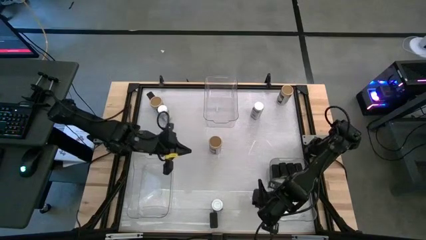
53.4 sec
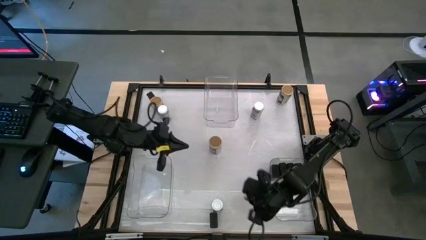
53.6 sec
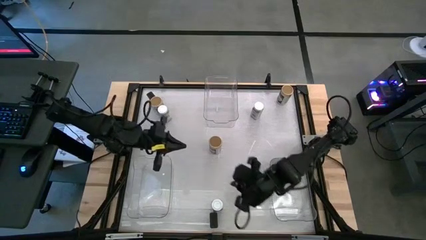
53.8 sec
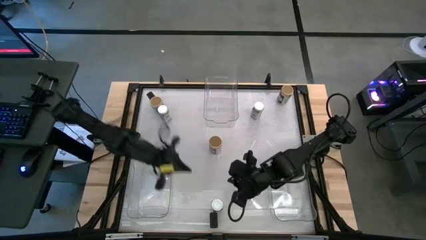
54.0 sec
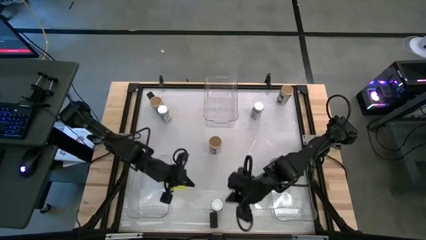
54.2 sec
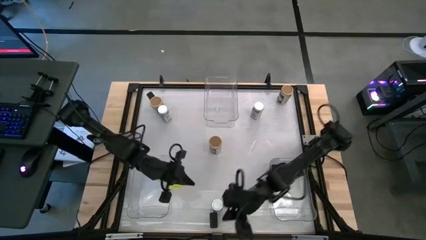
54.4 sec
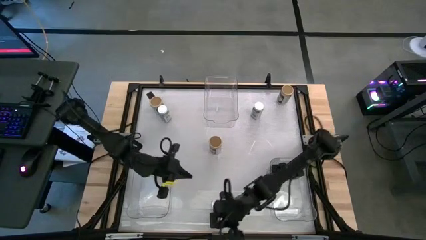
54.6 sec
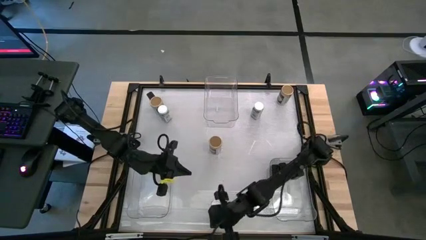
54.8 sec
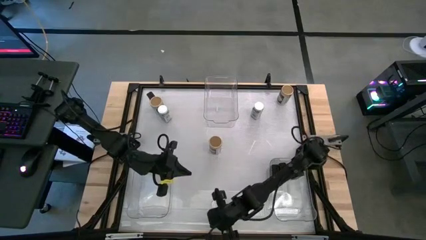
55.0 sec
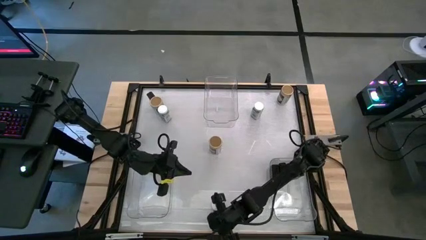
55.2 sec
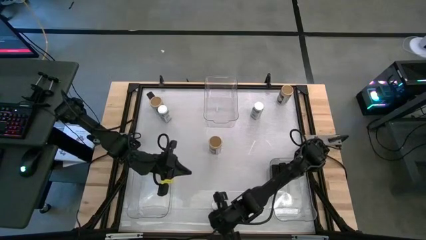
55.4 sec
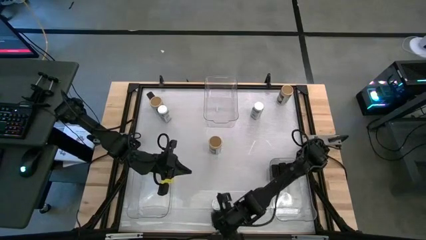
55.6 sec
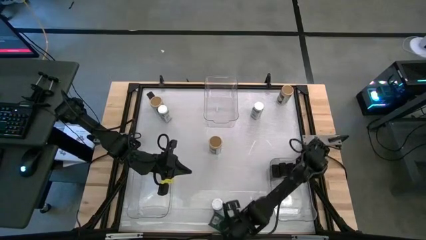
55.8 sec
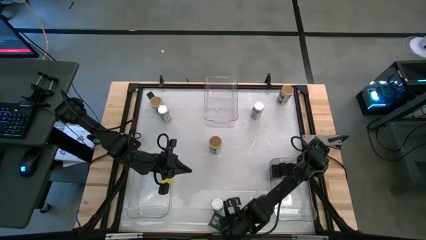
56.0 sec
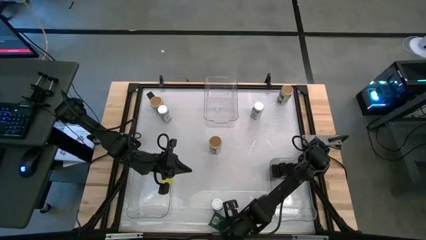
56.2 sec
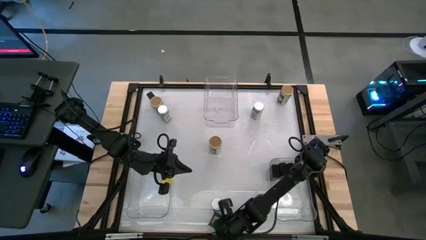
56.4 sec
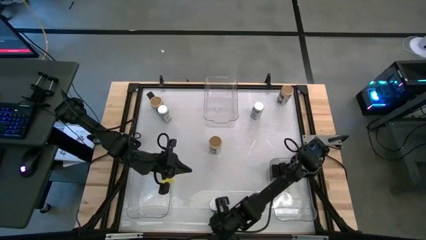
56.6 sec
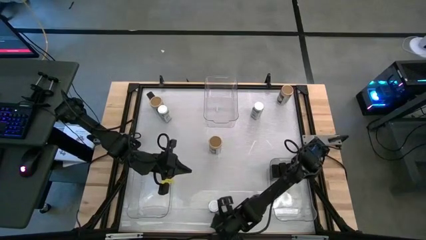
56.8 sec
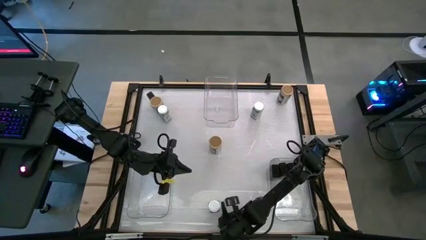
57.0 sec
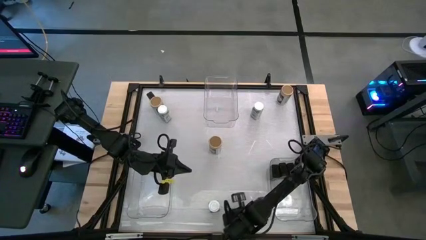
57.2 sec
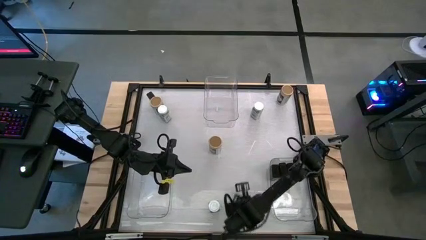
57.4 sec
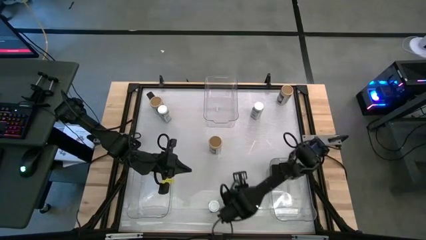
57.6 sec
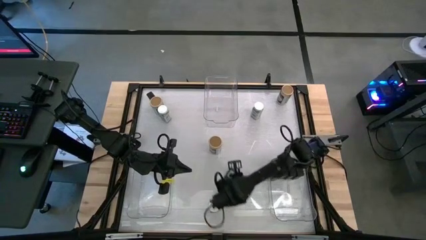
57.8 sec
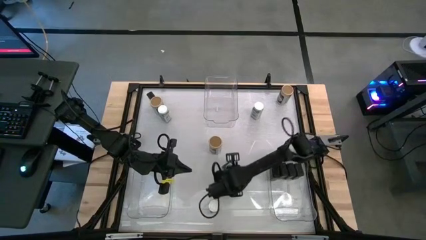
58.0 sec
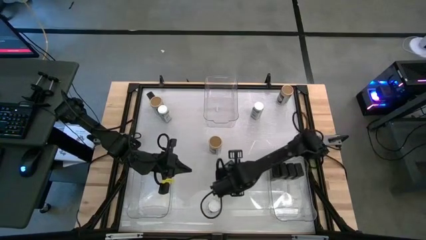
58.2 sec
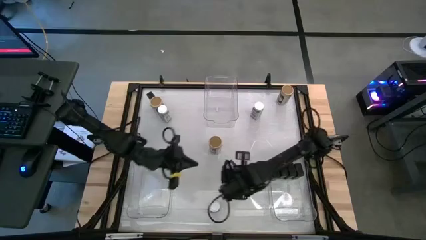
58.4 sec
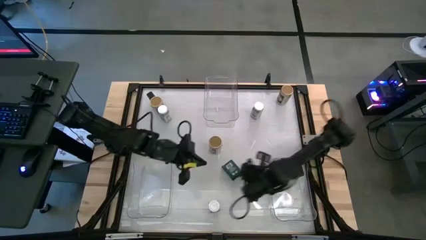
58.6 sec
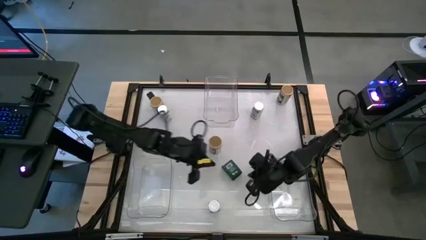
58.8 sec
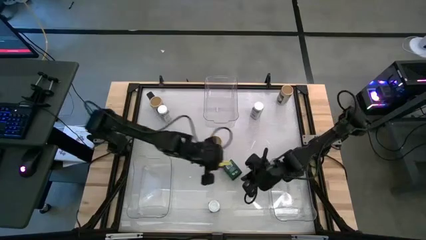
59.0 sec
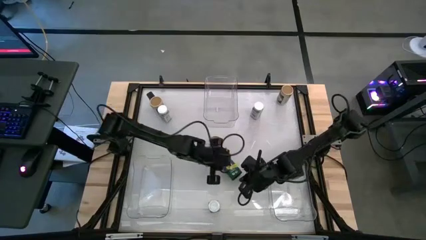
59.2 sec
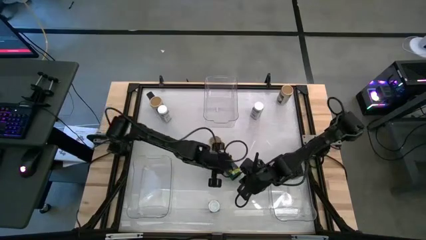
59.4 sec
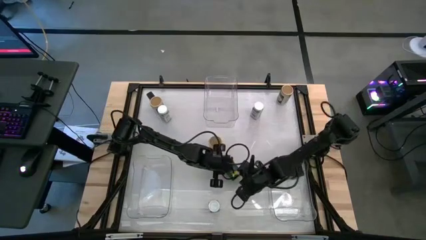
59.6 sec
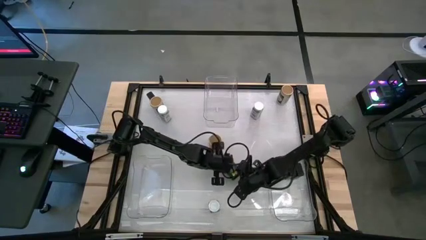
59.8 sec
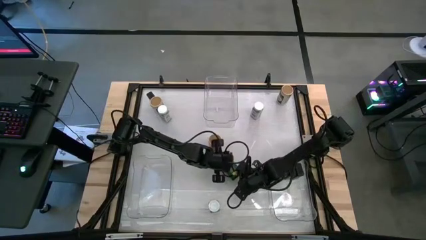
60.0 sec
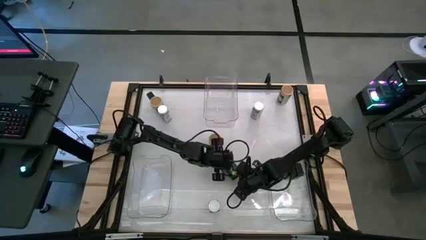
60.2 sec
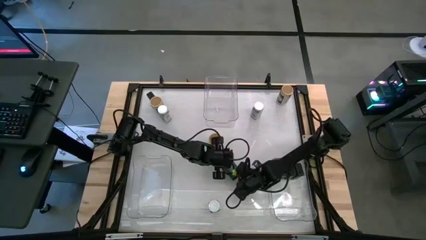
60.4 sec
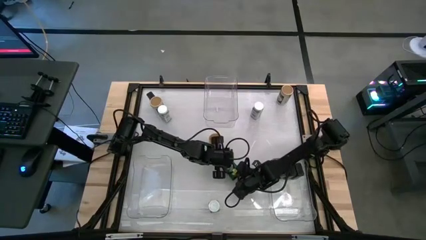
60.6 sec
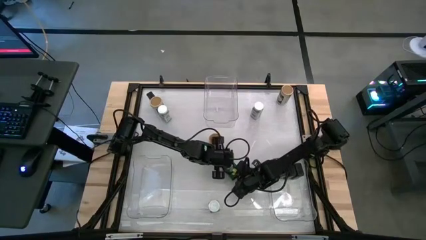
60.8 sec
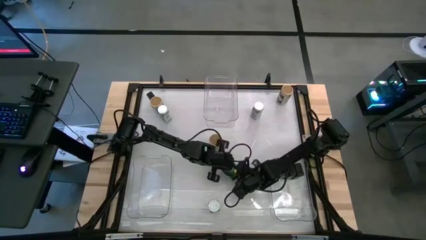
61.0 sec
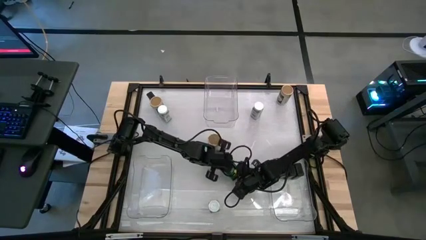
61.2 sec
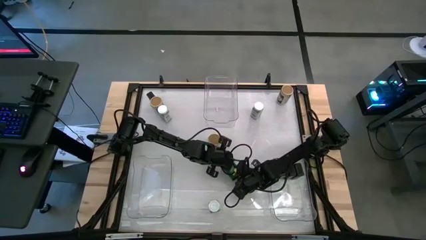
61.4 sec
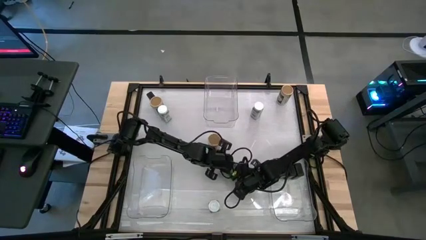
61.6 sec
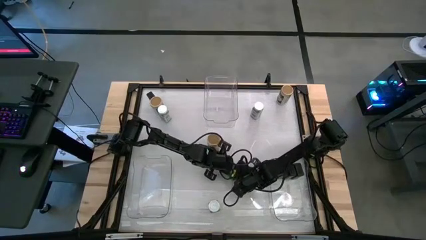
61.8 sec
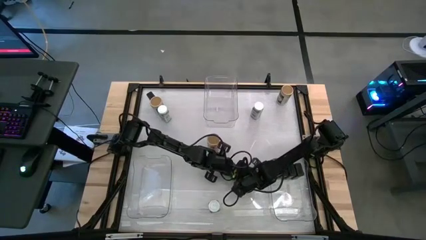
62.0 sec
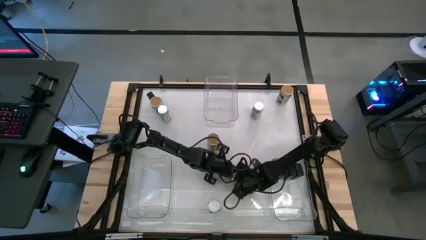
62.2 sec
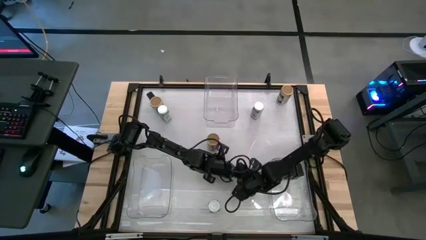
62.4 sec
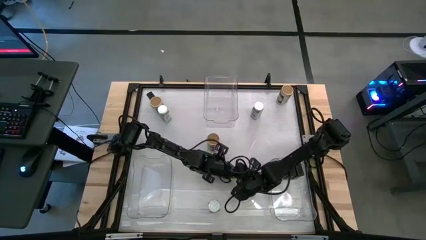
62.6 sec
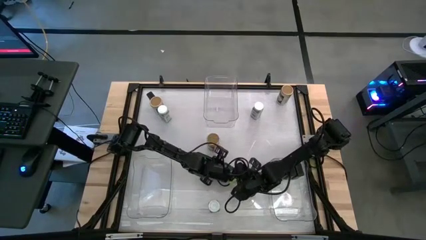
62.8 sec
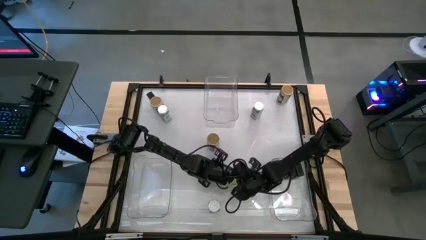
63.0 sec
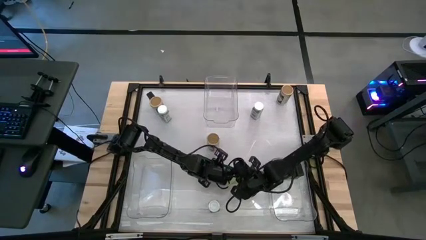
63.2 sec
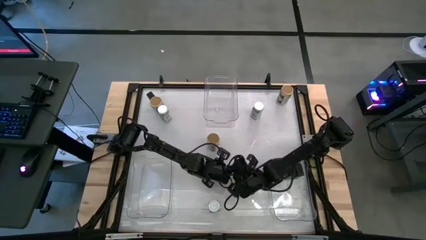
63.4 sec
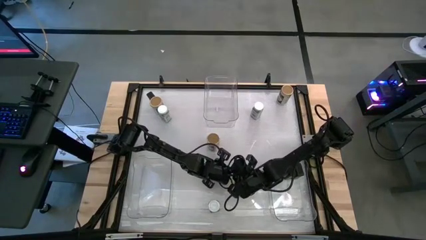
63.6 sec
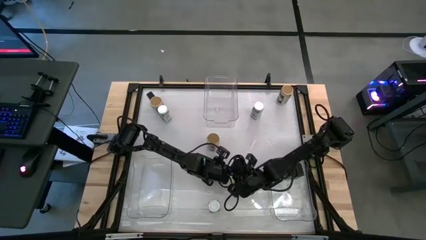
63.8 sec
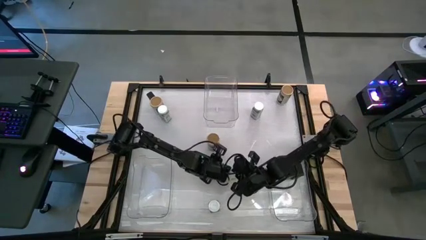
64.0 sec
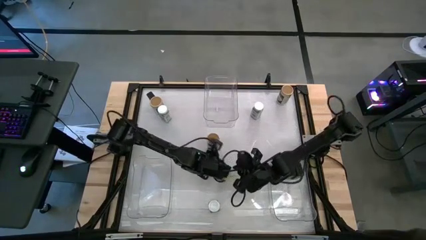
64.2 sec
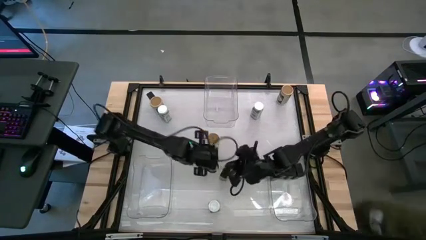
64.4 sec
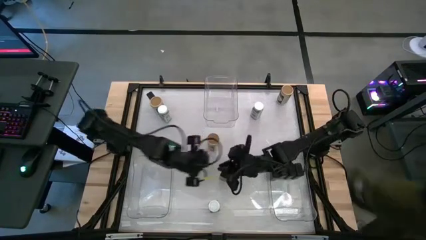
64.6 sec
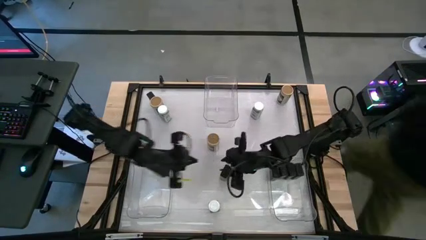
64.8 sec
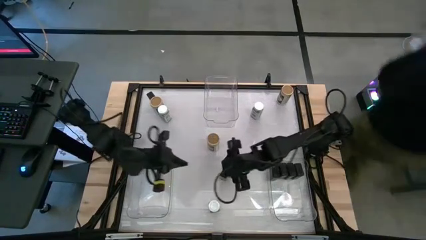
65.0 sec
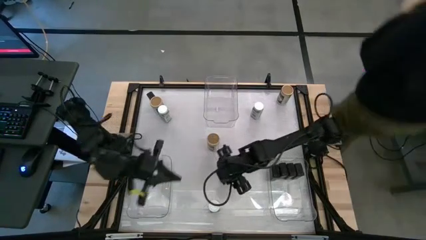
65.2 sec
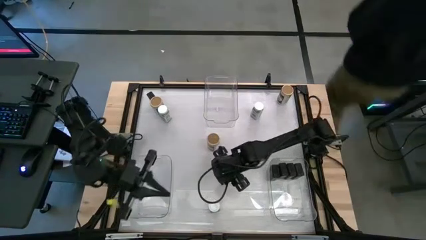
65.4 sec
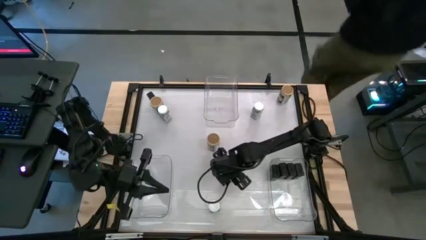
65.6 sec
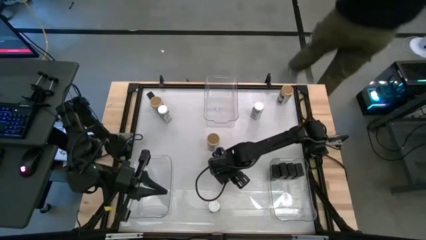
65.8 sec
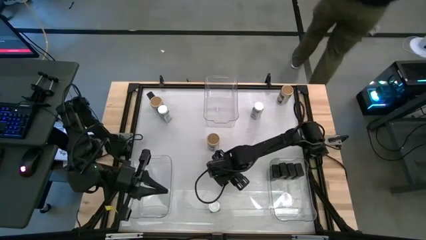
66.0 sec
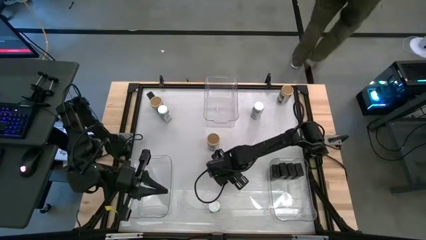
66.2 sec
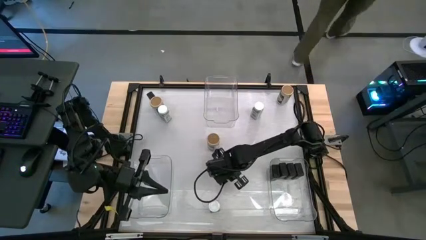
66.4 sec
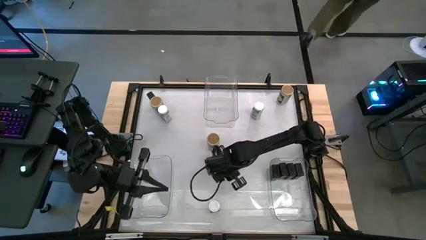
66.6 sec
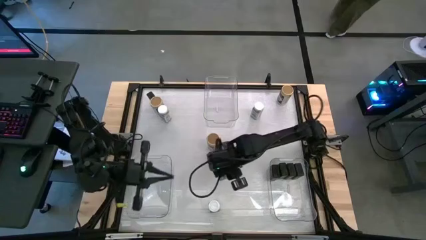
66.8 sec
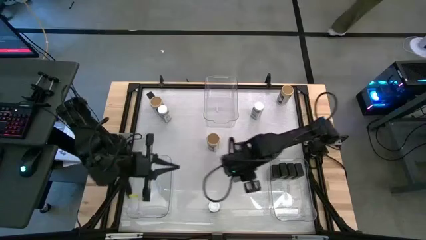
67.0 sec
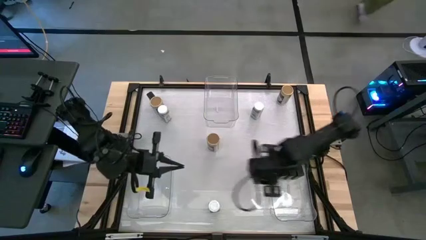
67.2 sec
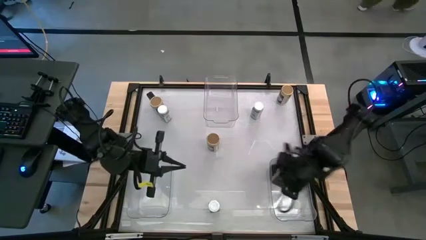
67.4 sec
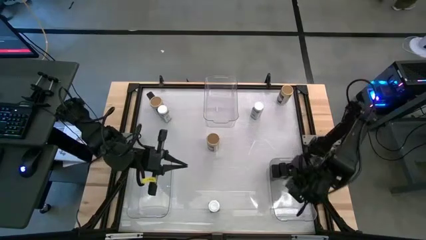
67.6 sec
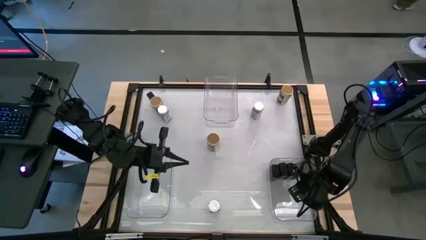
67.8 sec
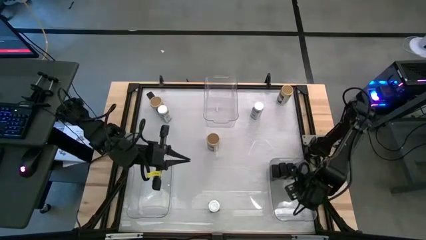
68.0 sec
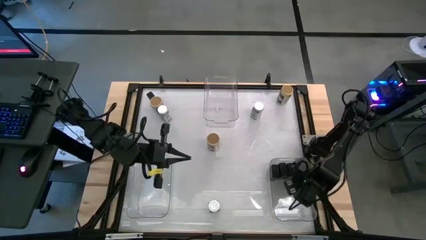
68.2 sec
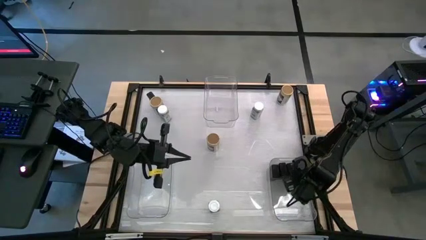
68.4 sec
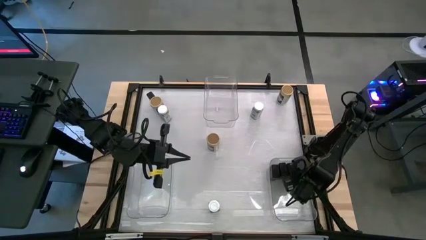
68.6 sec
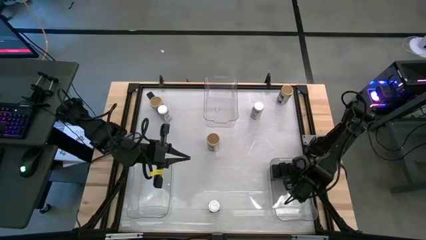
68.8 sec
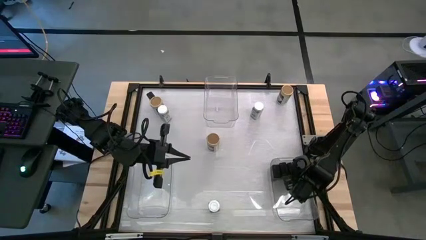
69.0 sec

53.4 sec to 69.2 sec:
Task: Sort spices by type
Put the black spice can into the right transparent bin

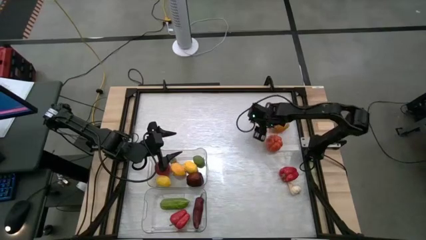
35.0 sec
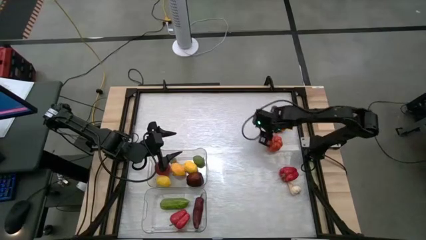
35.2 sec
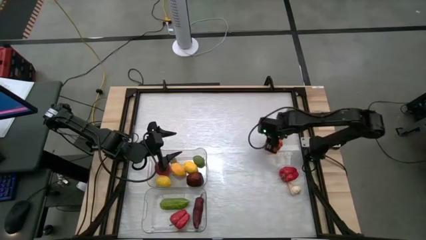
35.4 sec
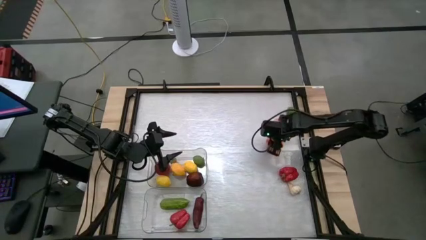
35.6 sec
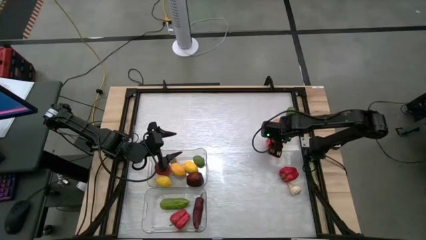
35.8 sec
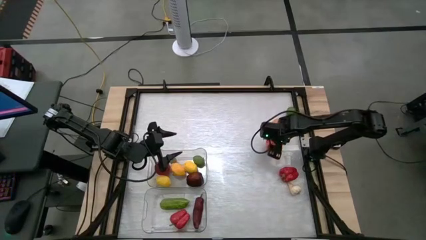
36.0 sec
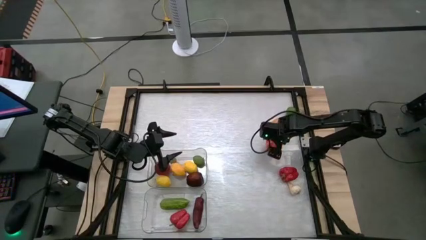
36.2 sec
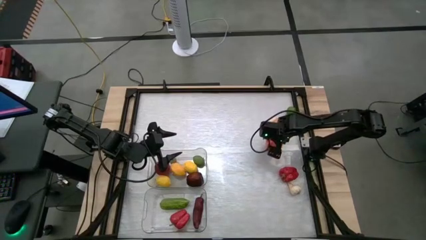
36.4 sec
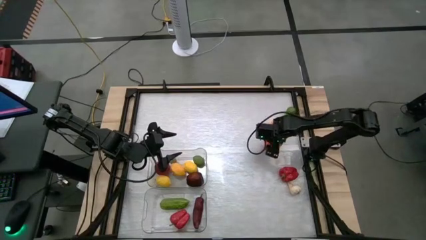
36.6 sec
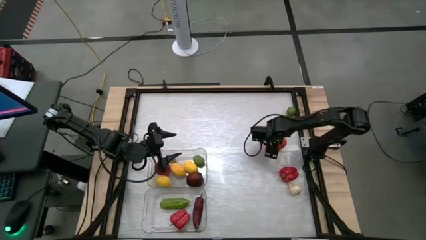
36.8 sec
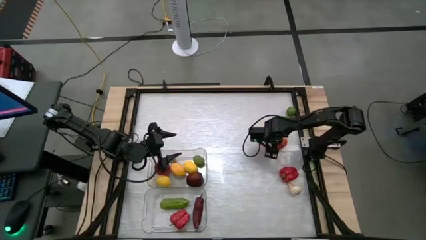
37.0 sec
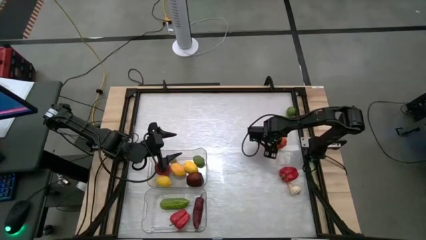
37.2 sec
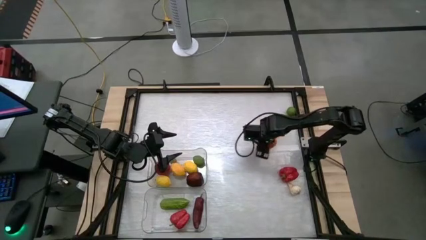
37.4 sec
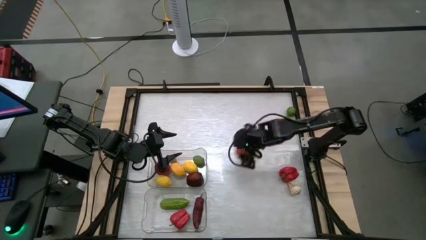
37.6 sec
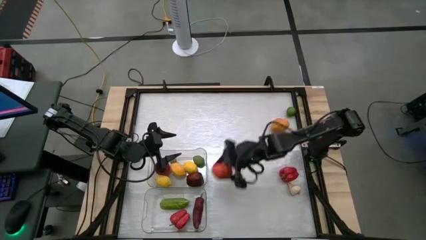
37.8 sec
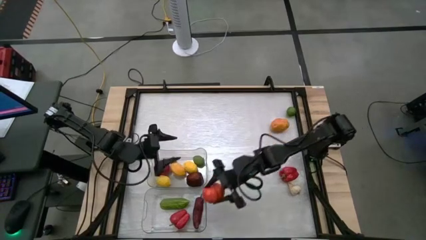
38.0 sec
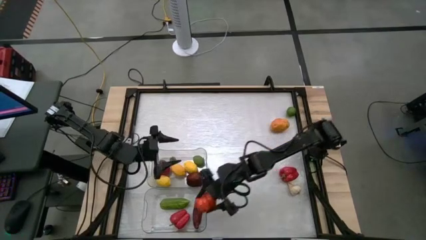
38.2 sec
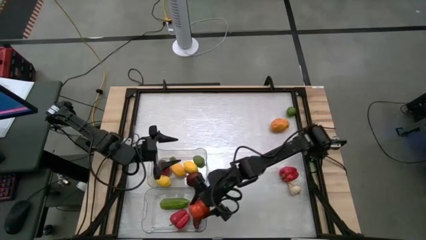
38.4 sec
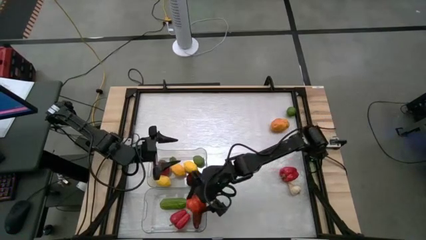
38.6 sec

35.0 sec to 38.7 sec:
Task: Sort produce into baskets
Put the orange pumpkin into the bottom transparent bin
